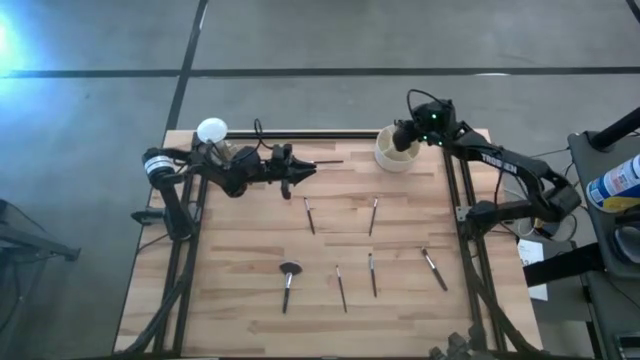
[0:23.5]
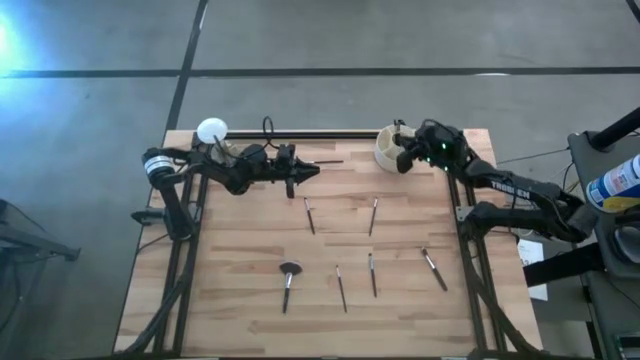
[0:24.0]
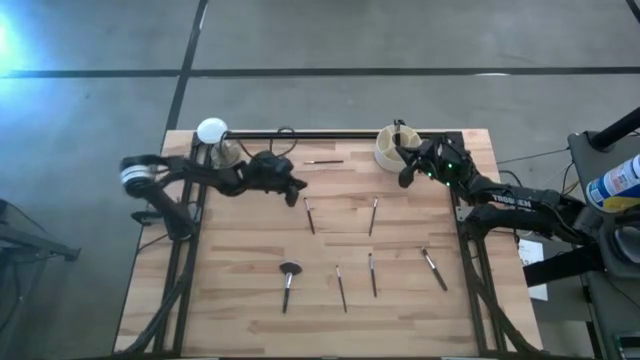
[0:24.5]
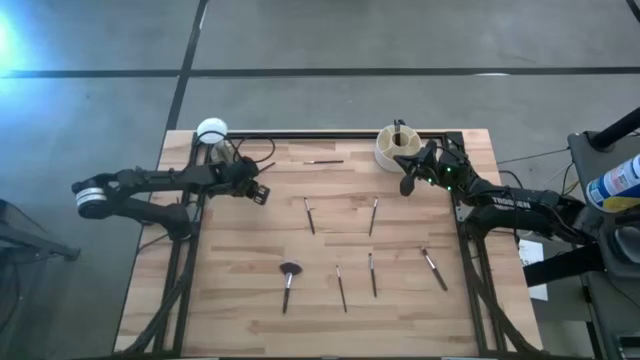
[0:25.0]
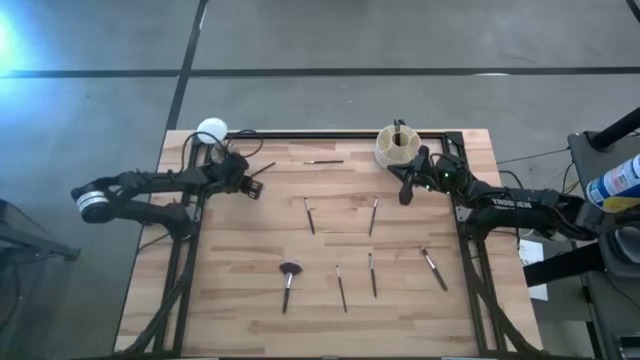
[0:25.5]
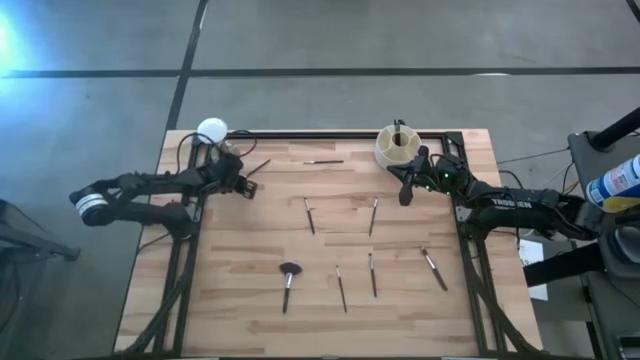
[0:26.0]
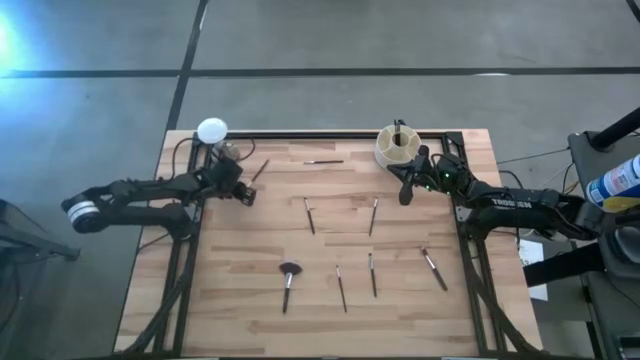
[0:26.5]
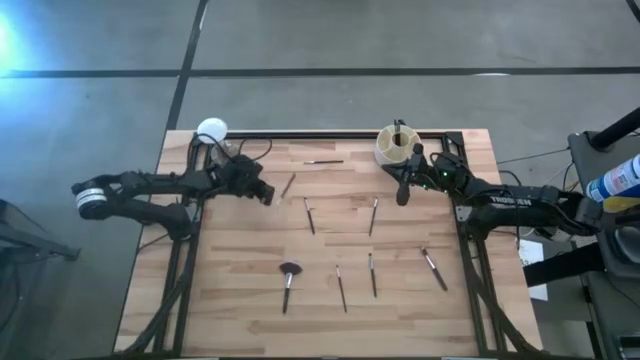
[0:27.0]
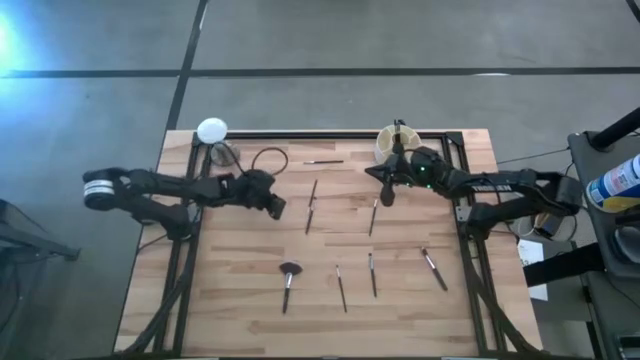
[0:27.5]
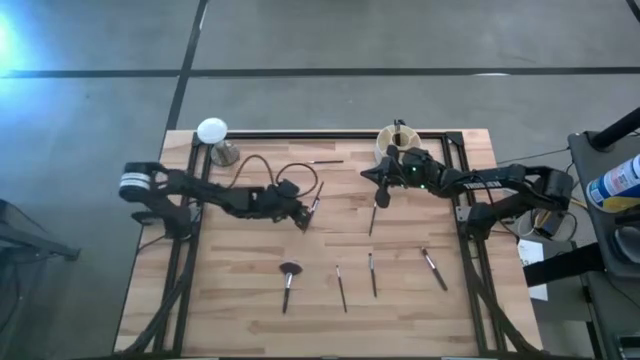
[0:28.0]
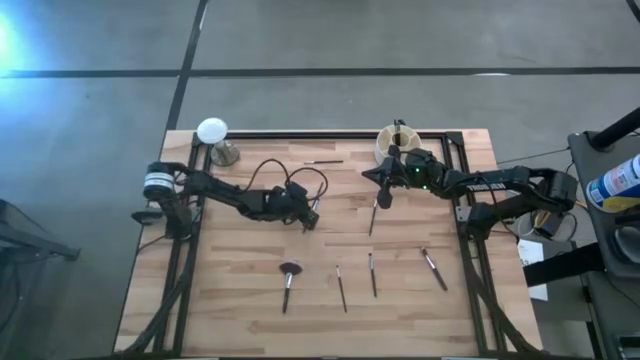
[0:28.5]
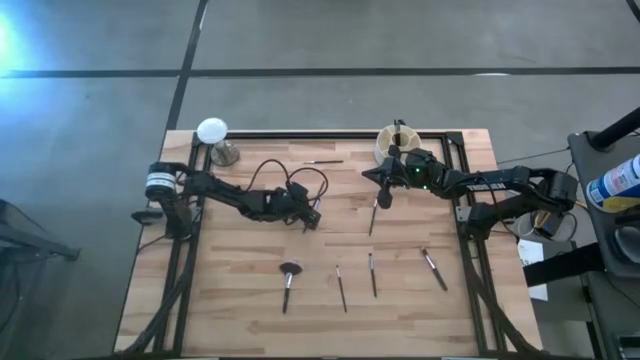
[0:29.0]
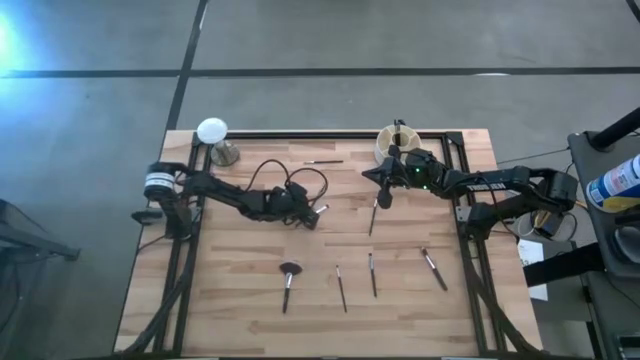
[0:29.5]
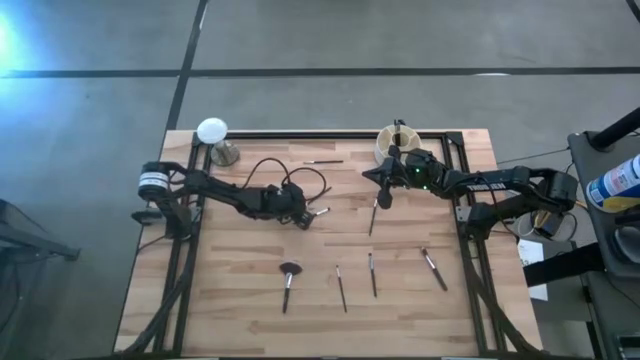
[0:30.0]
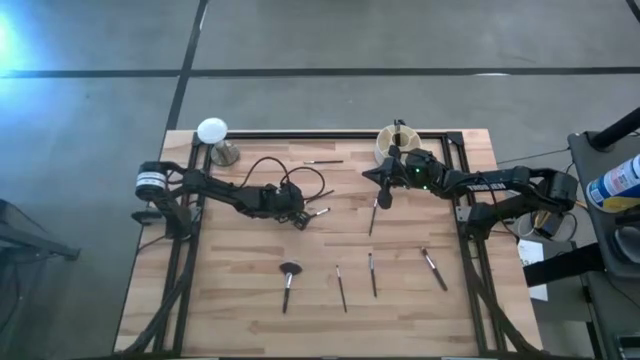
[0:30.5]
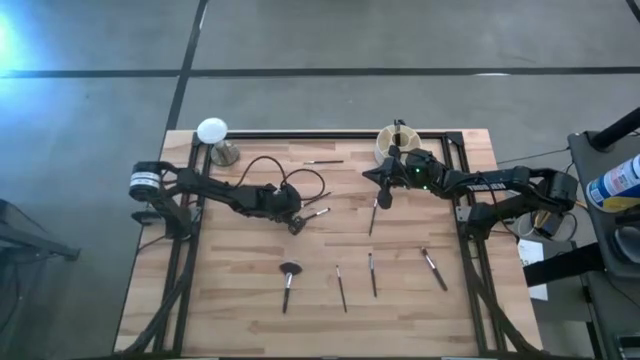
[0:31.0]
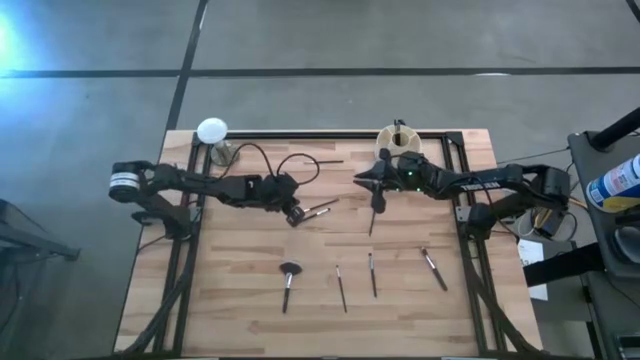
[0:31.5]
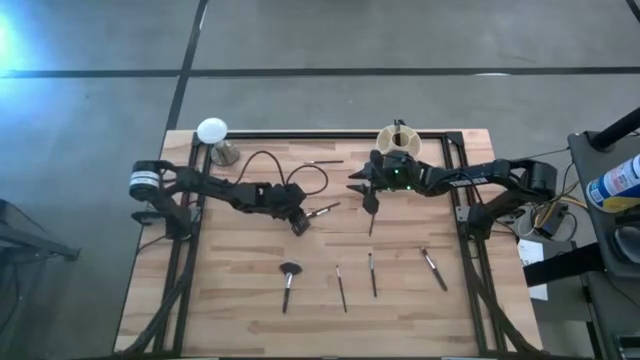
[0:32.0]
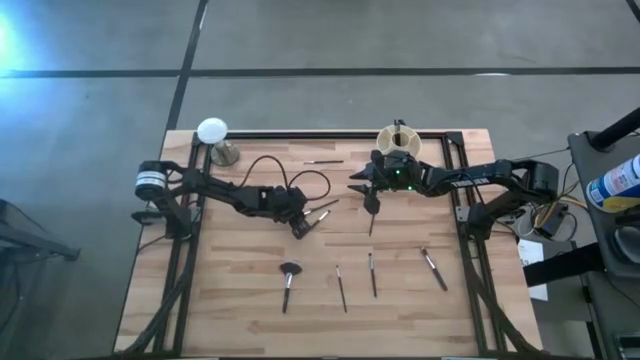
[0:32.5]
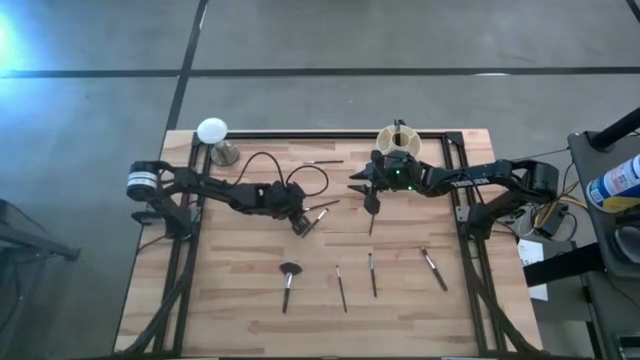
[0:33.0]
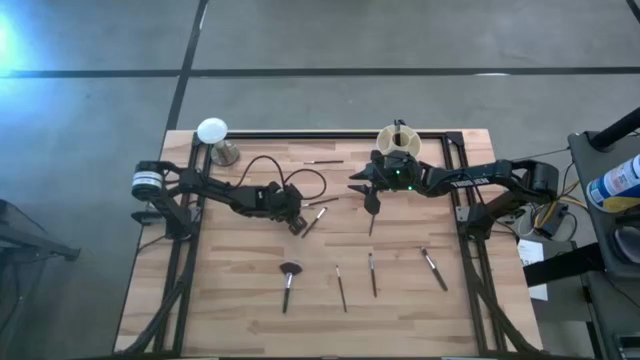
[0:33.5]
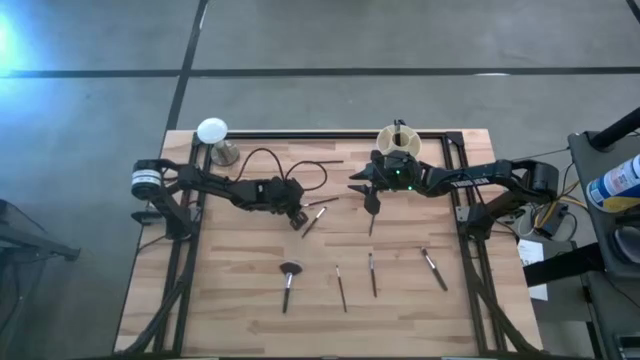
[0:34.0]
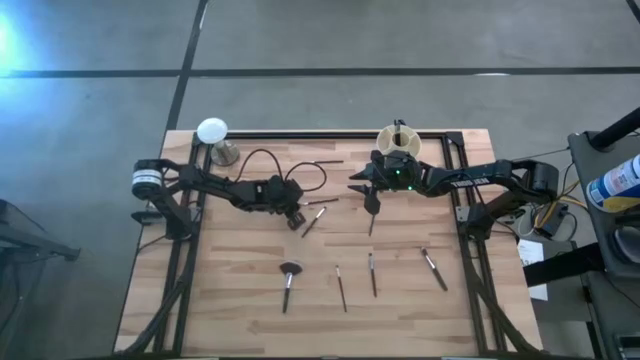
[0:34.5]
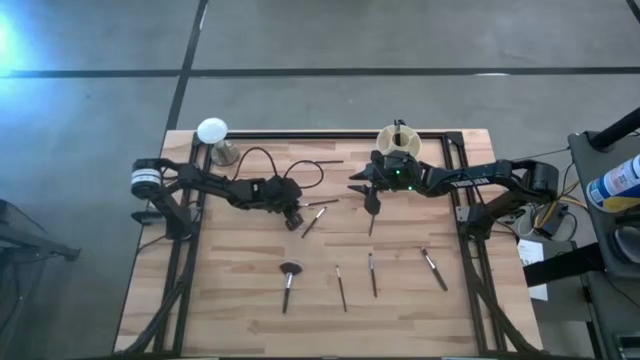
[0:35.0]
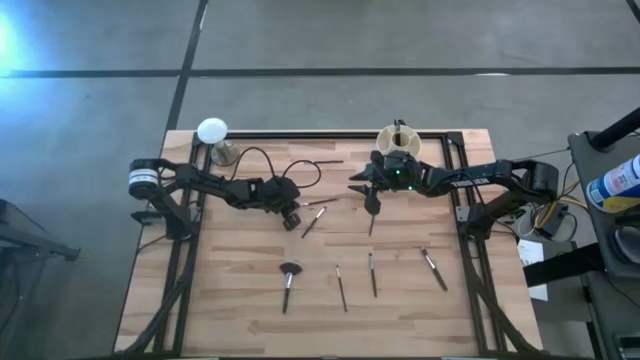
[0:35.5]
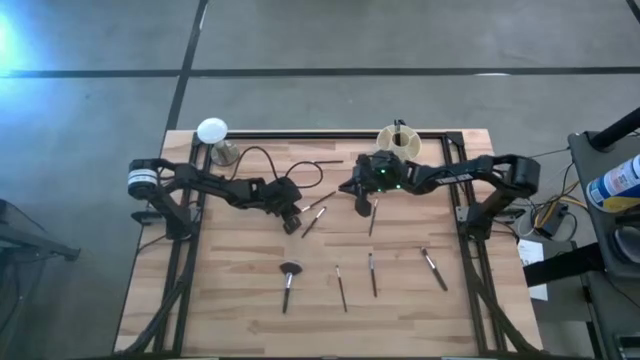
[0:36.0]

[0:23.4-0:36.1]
Task: Put items in baskets/containers
Put the black liner brush into the white pen organizer

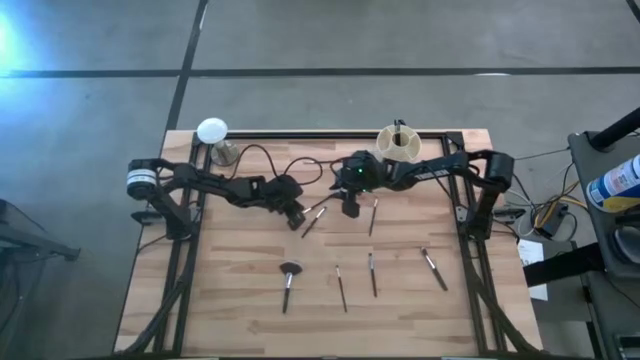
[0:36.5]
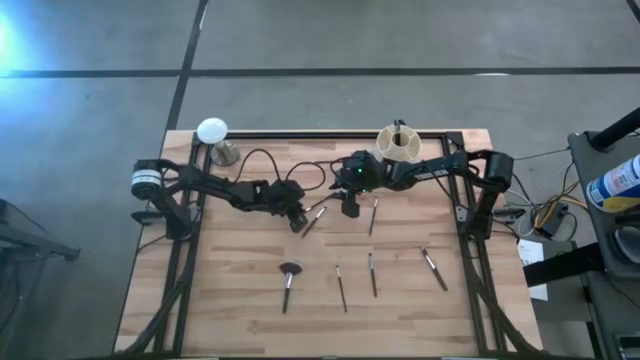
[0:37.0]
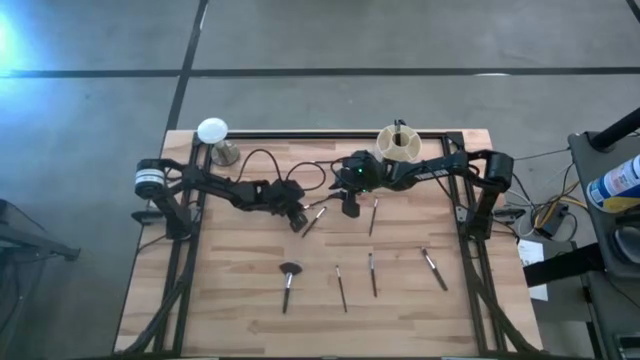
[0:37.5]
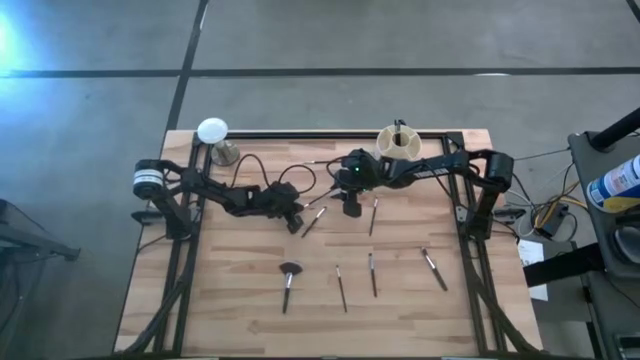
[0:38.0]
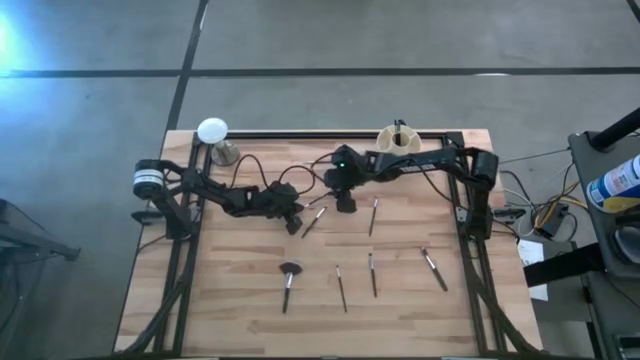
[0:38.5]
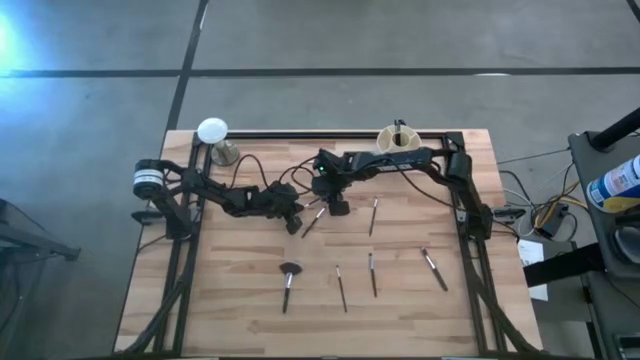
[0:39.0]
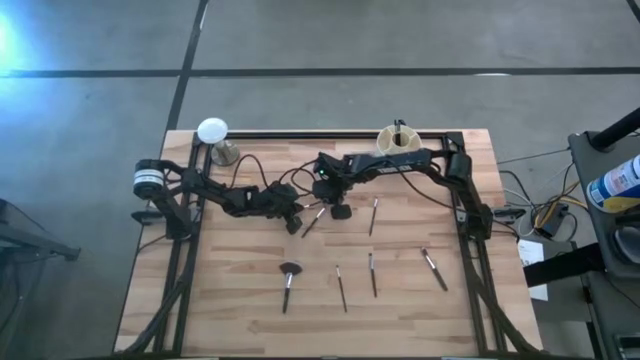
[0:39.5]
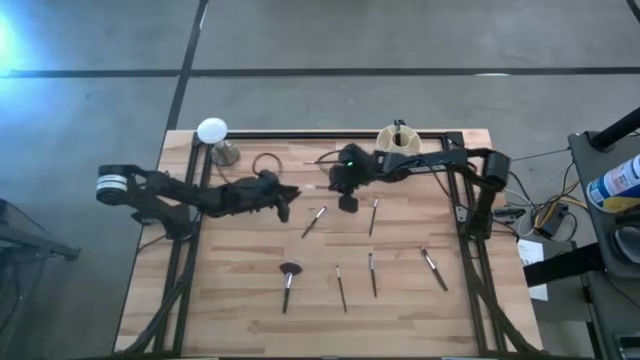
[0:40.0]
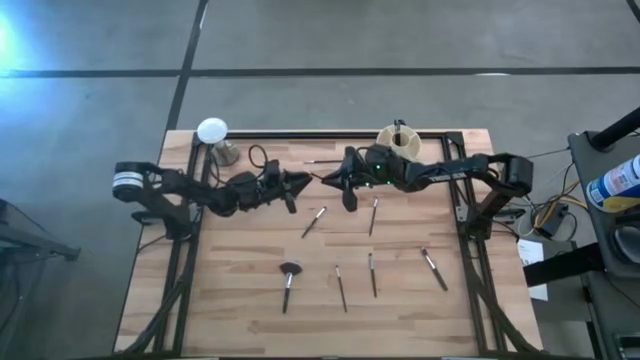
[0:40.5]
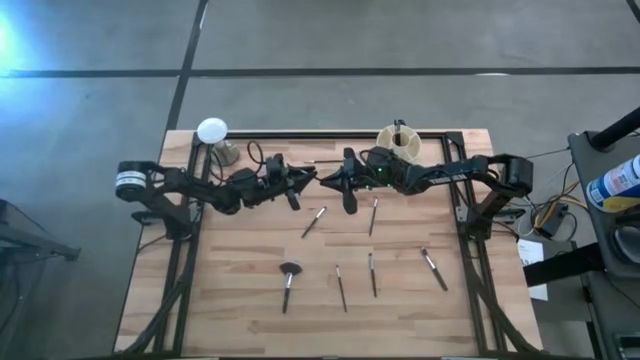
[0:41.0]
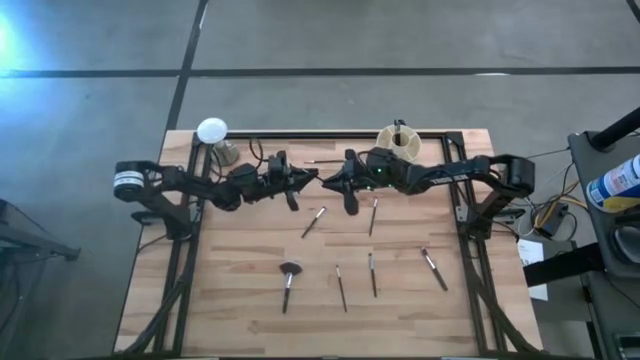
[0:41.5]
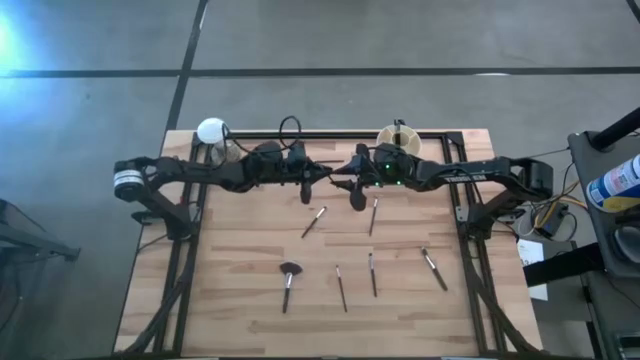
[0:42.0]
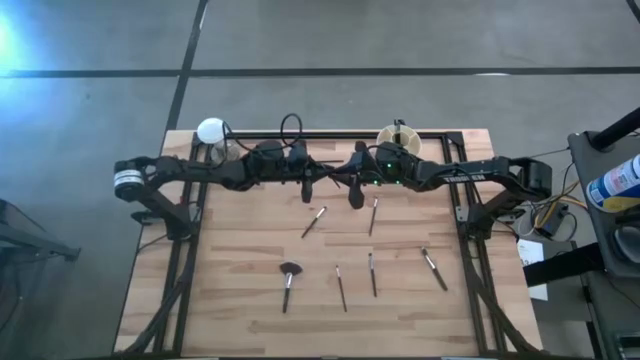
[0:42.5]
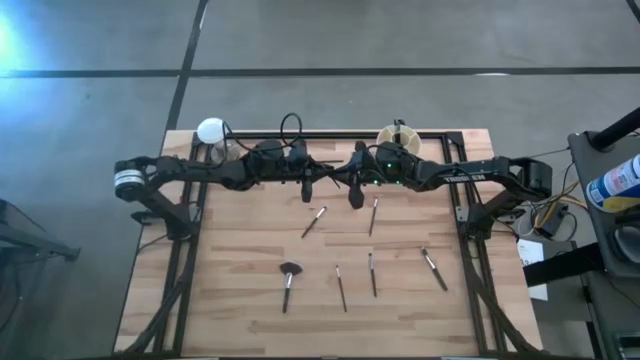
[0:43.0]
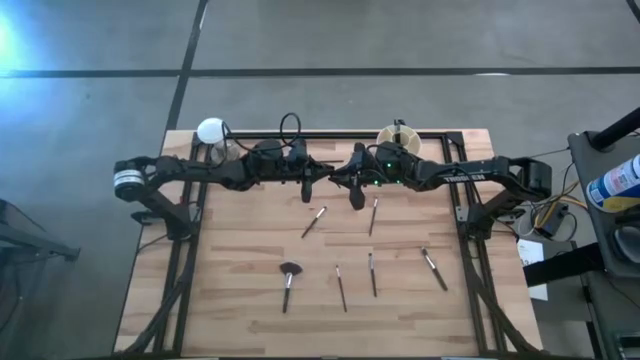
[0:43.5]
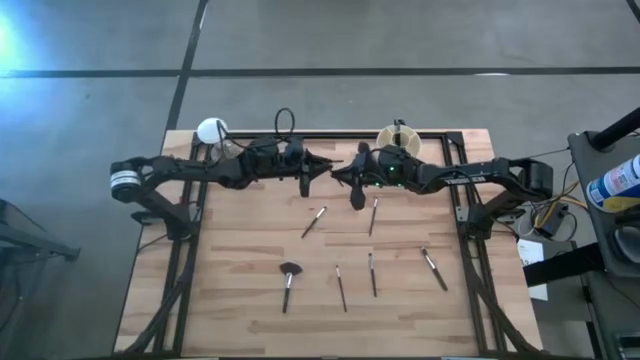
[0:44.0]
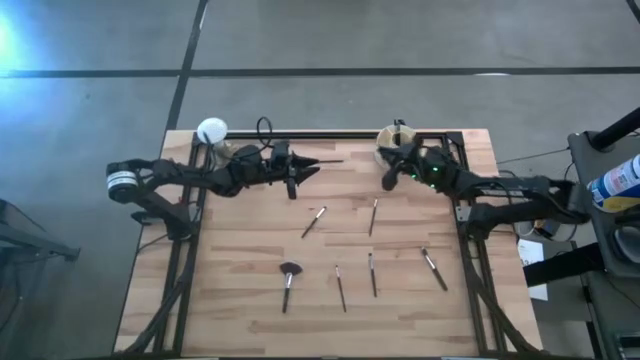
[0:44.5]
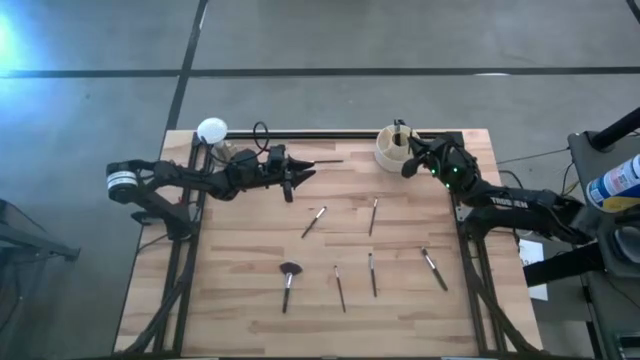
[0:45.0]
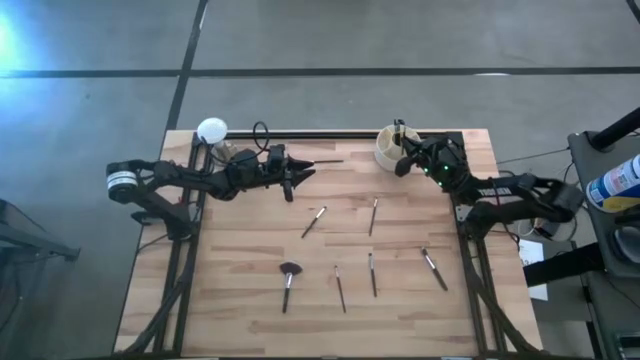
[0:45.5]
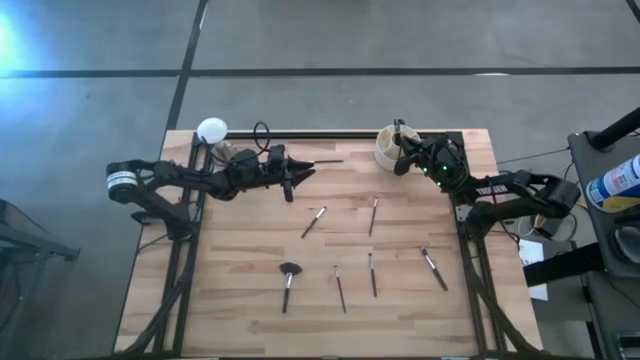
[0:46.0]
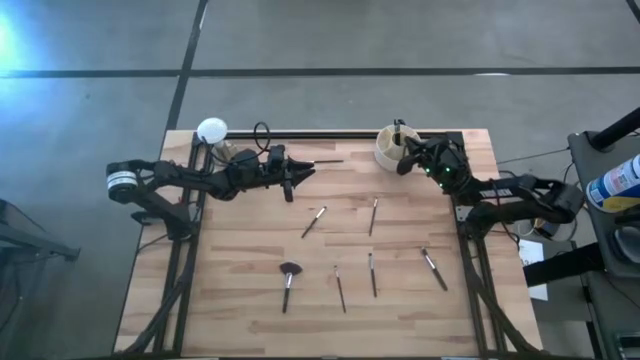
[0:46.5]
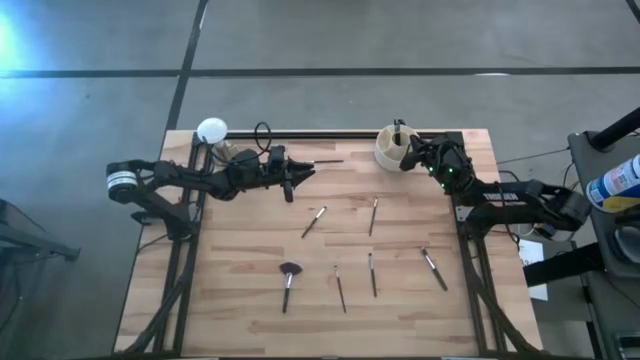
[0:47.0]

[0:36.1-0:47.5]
Put the black liner brush into the white pen organizer
